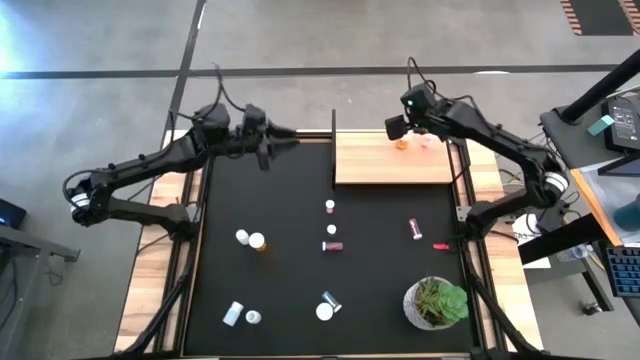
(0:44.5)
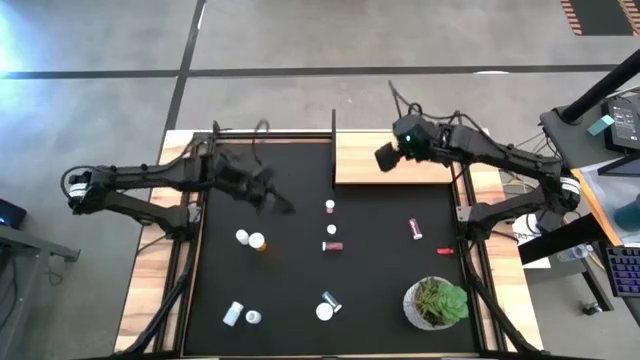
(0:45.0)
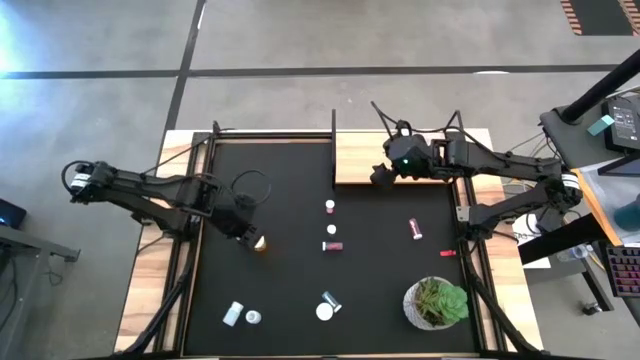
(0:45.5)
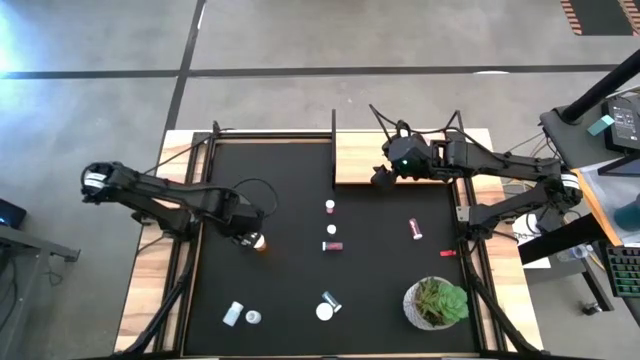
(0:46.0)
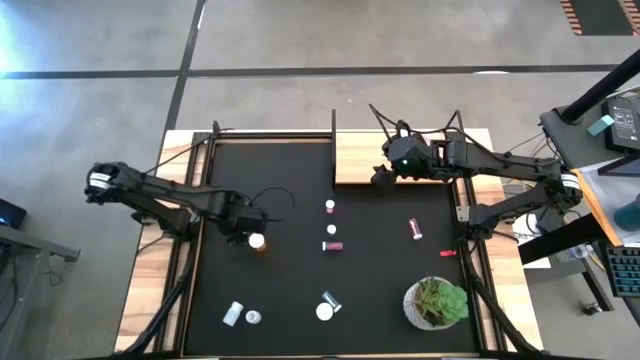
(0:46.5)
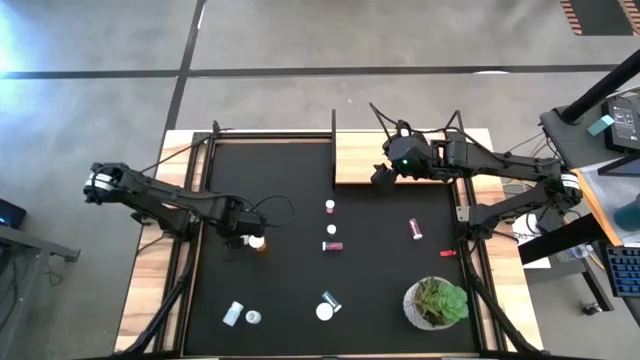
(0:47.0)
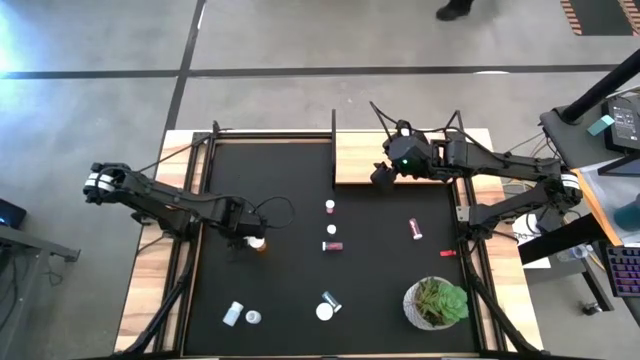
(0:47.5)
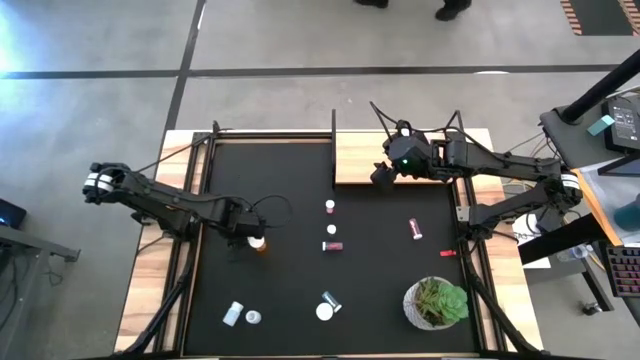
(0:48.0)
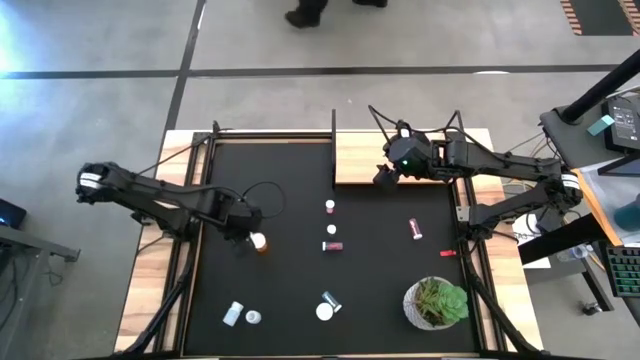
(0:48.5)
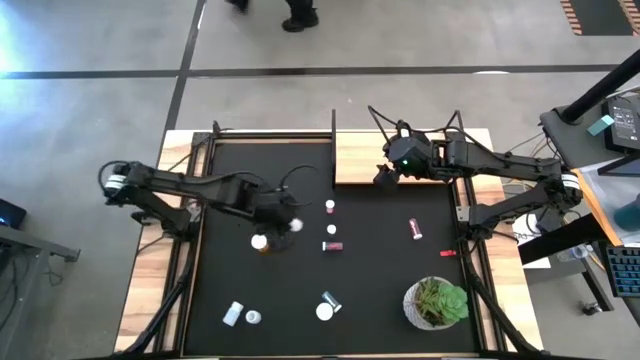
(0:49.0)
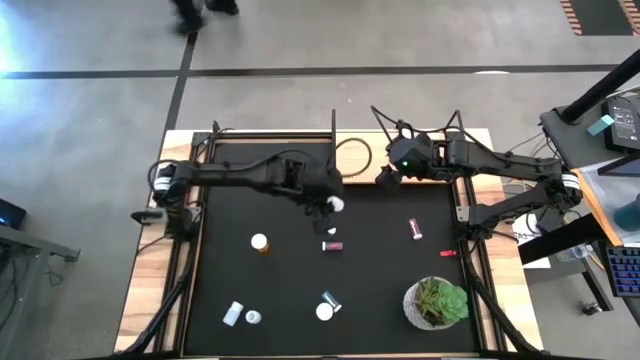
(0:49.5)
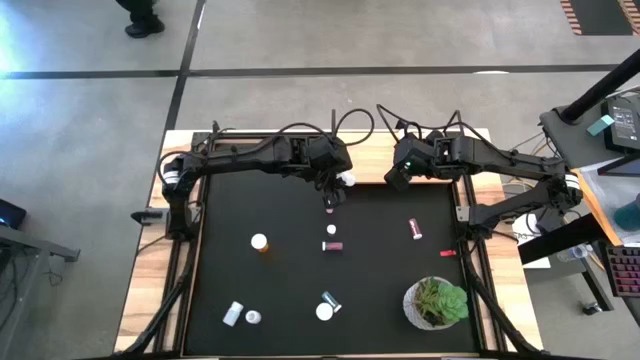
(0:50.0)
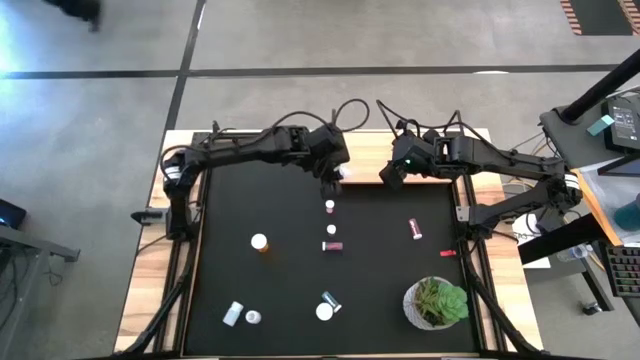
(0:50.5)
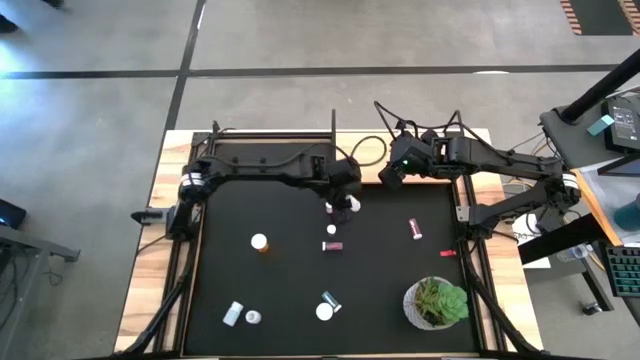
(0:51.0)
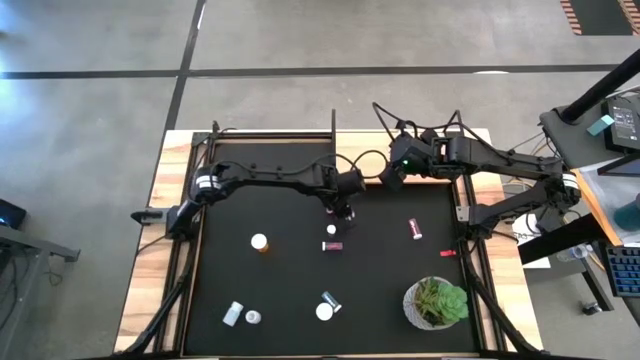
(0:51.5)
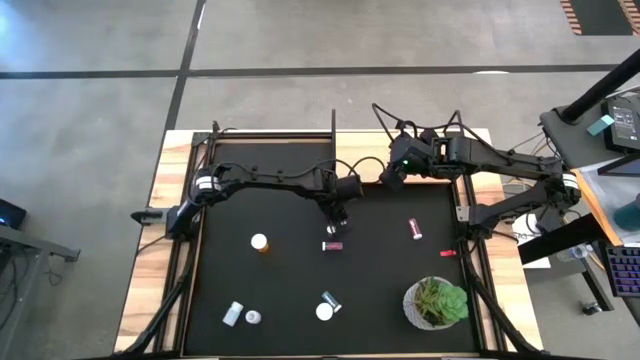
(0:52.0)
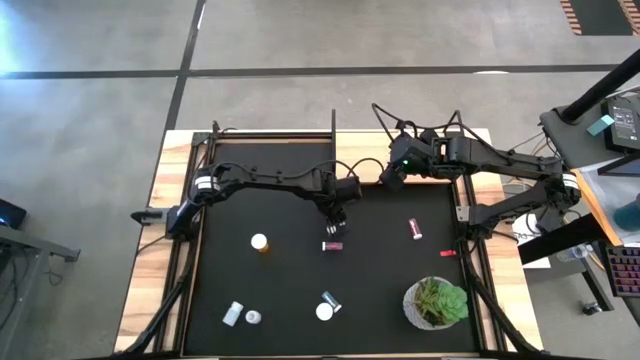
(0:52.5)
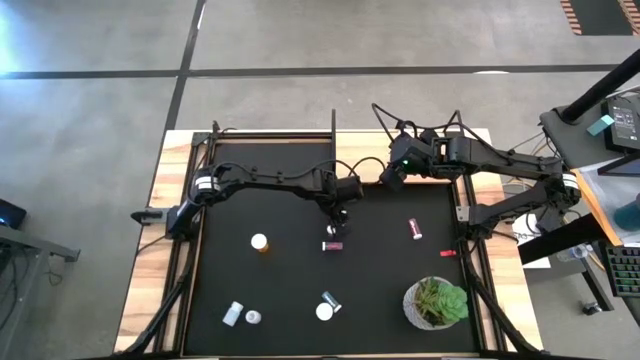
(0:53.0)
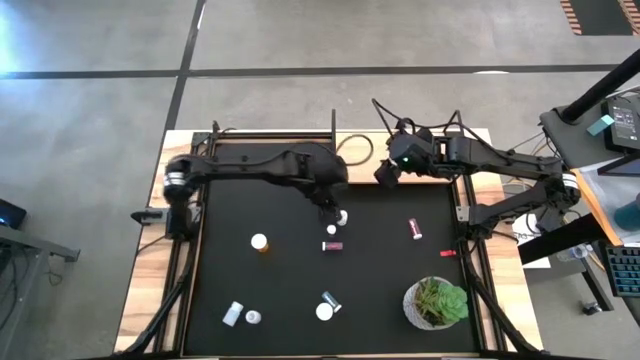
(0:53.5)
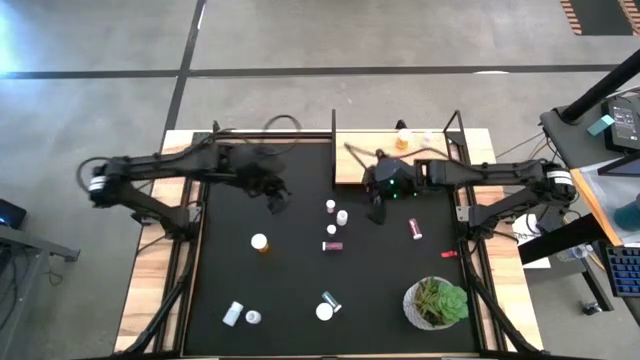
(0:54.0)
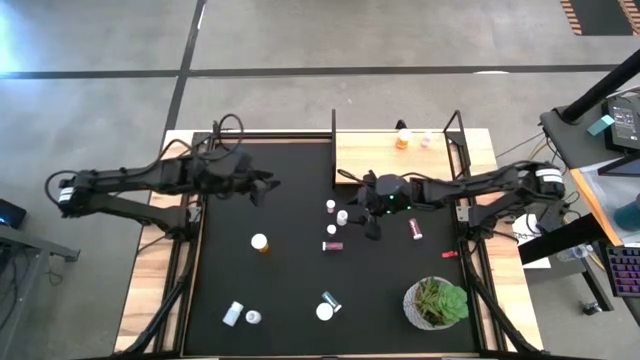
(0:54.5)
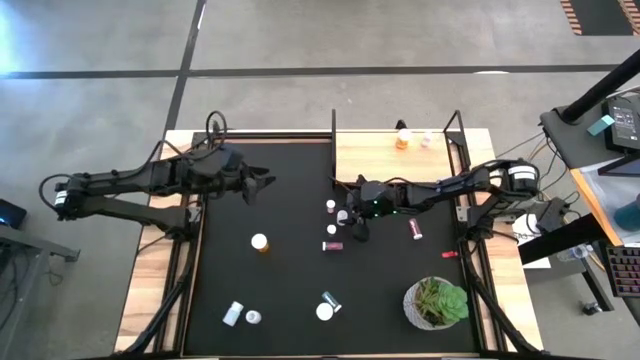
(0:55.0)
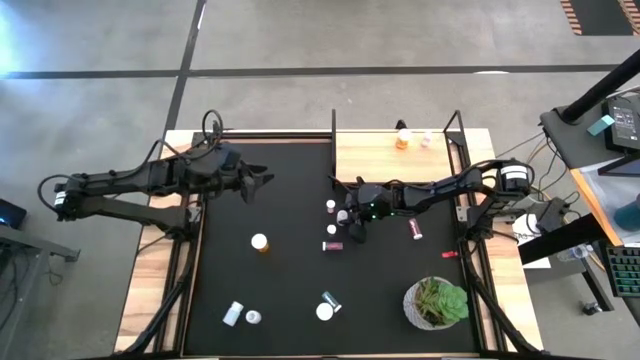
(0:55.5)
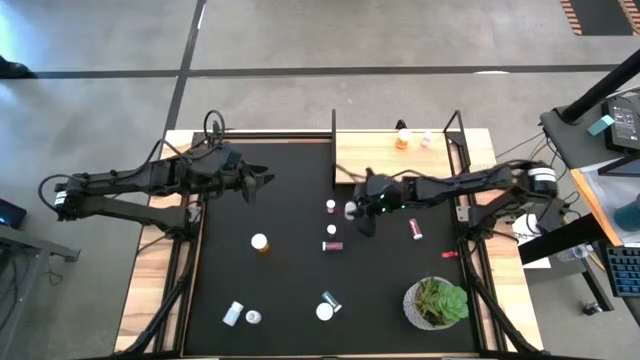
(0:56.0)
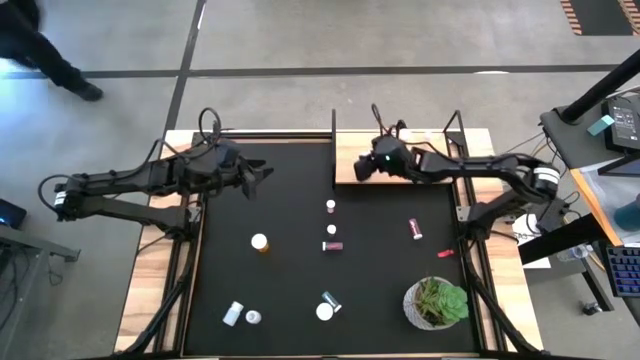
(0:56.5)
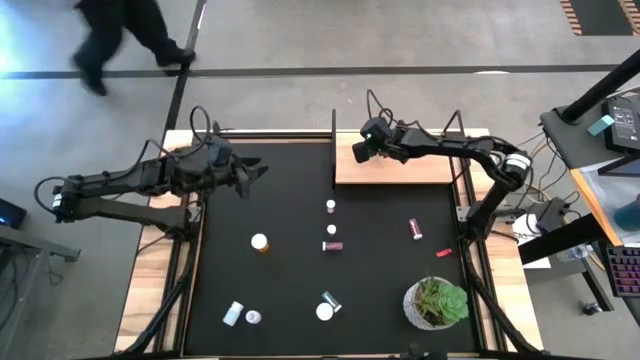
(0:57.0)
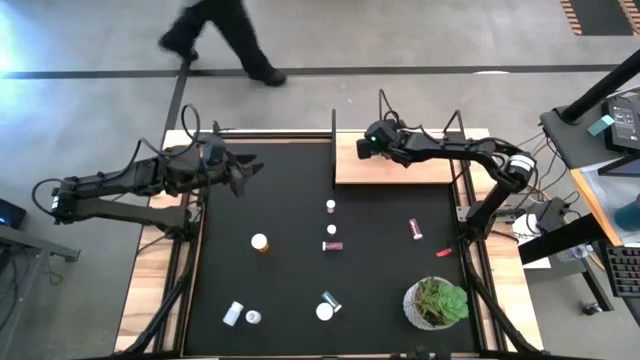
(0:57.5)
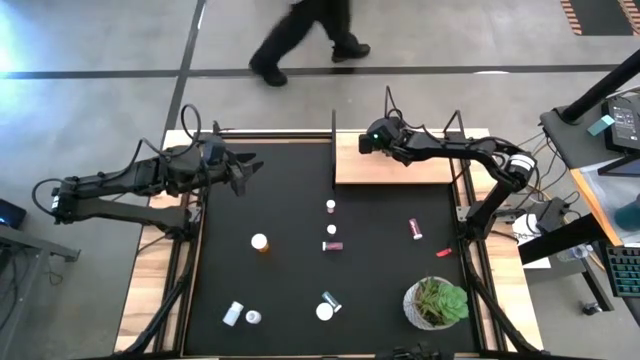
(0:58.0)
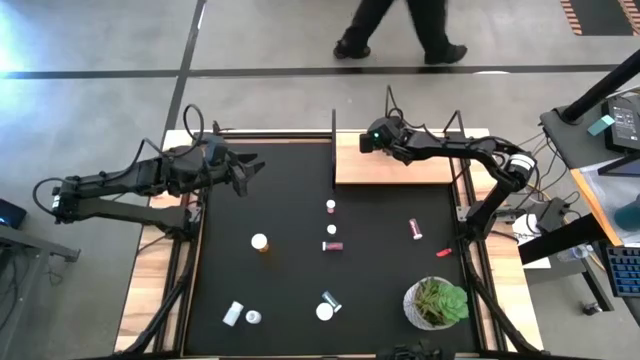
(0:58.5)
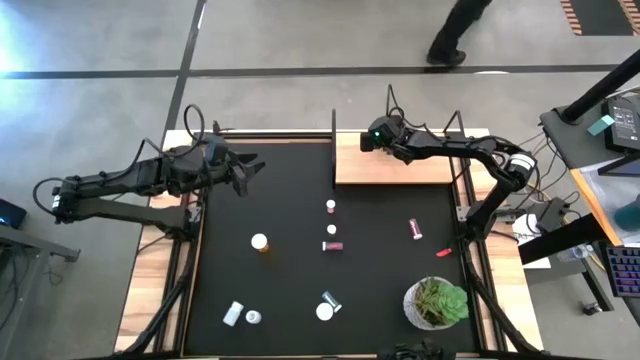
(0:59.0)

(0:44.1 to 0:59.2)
Task: Pick and place medicine bottles onto shelf by color
Put the top white pill bottle on the shelf

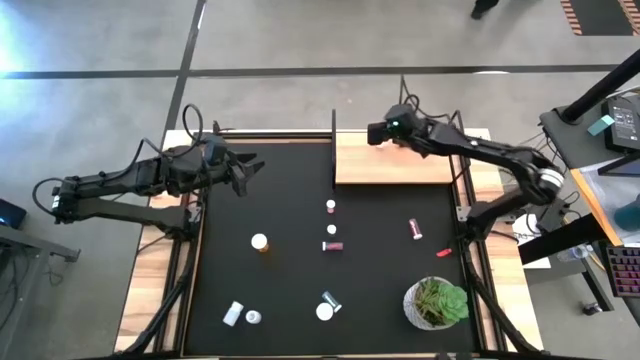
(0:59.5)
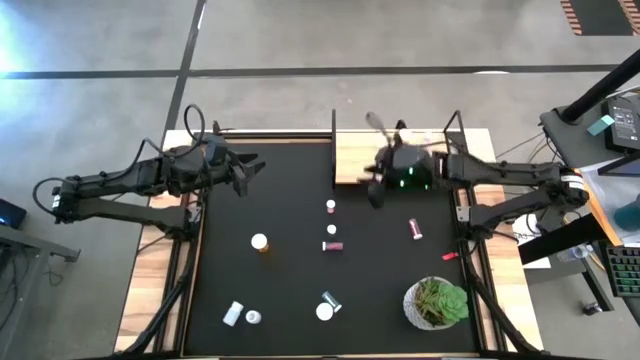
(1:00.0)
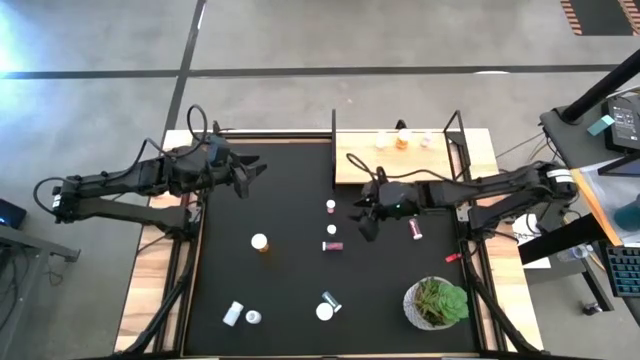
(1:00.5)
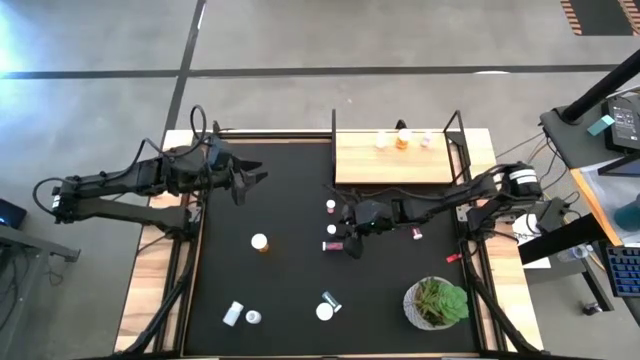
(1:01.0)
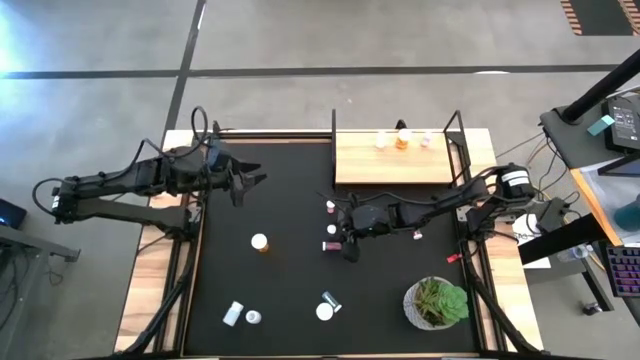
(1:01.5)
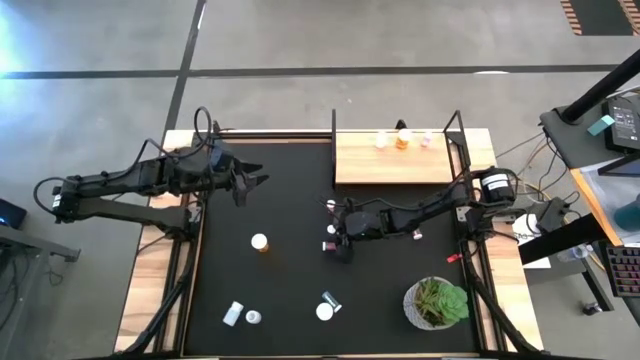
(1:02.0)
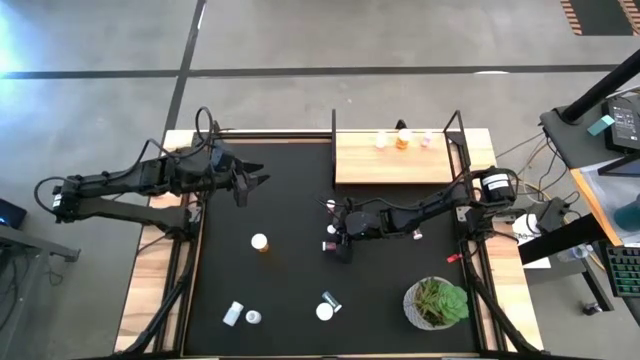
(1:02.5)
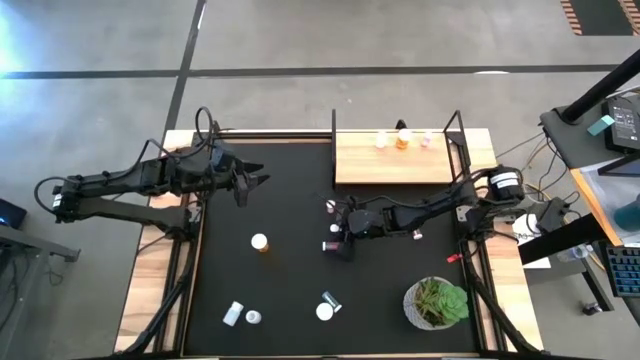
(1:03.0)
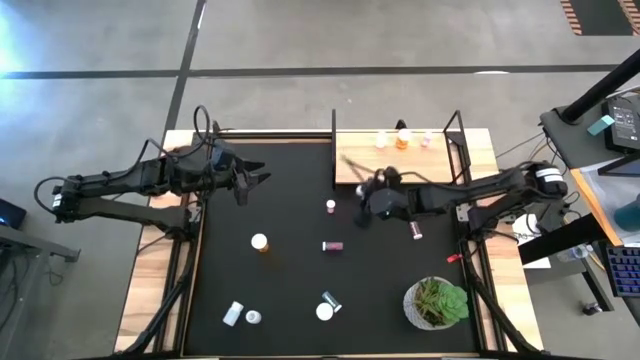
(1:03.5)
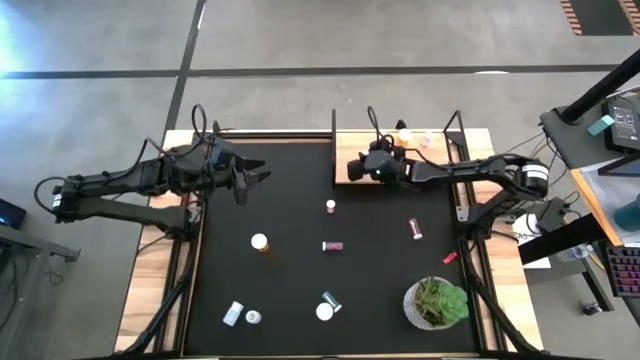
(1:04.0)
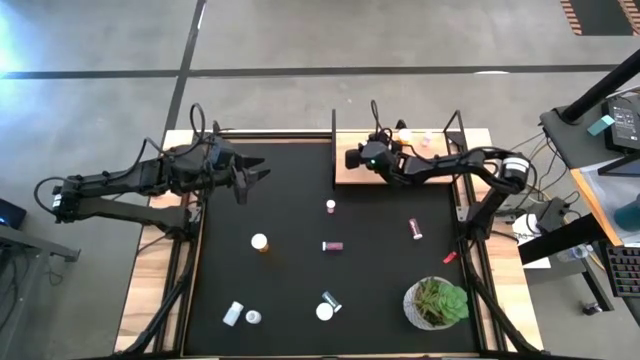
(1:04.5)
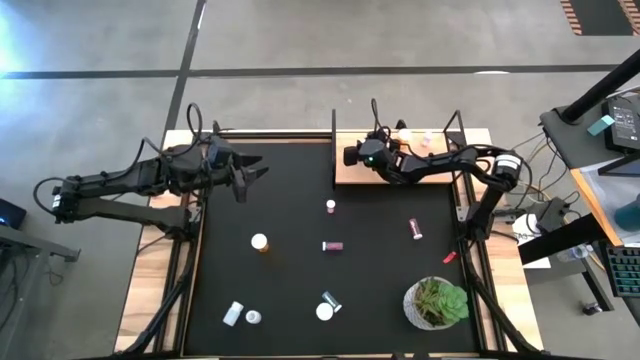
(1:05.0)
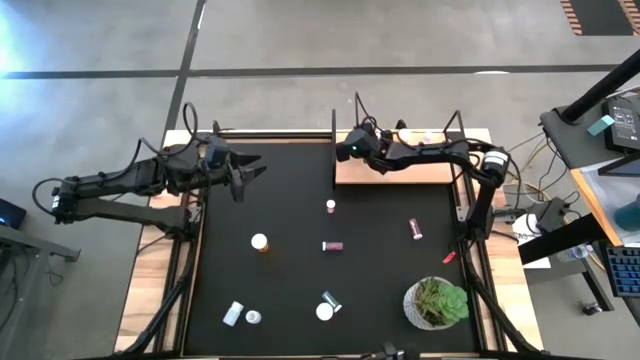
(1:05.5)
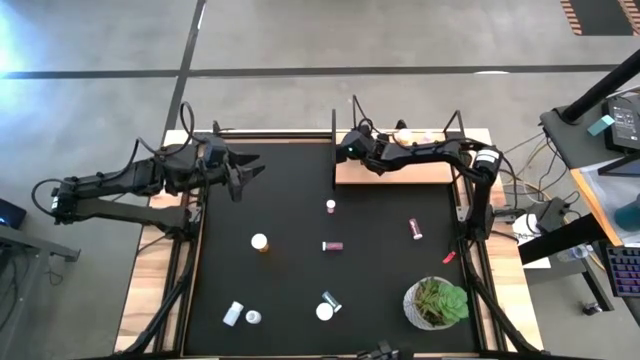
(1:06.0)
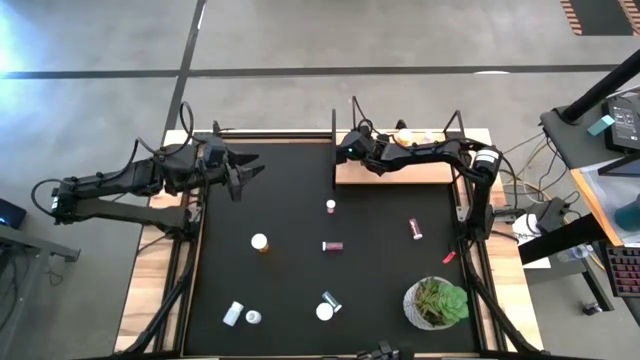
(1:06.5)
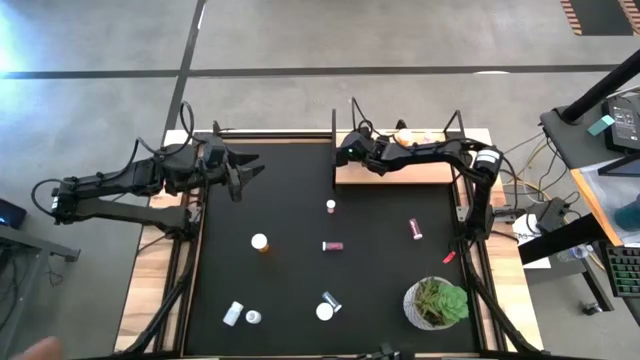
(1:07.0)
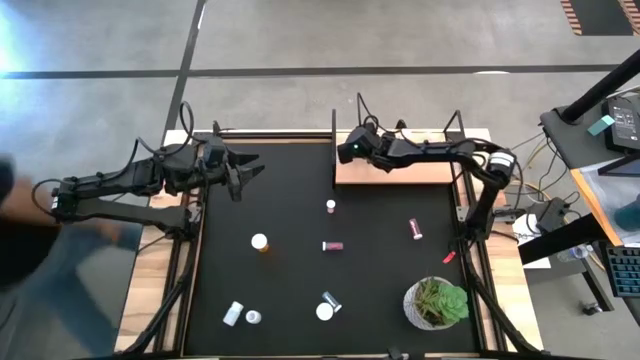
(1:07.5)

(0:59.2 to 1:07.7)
Put the top blue pill bottle on the shelf
